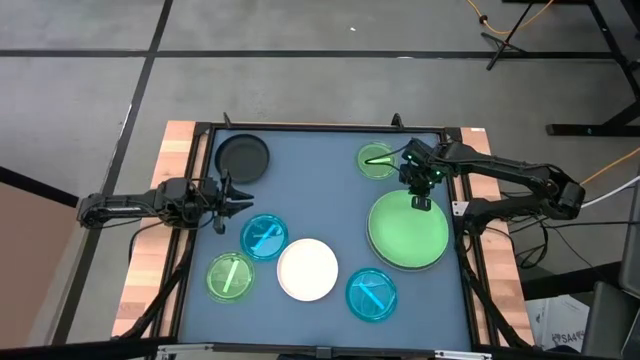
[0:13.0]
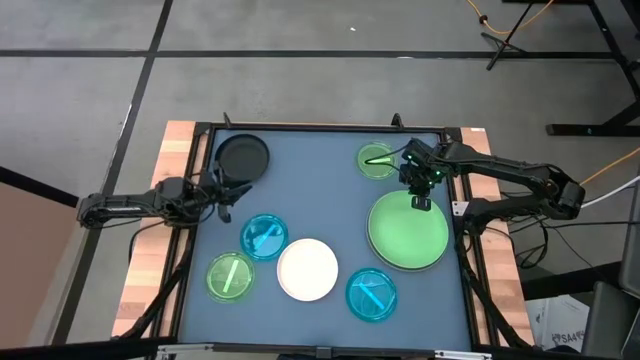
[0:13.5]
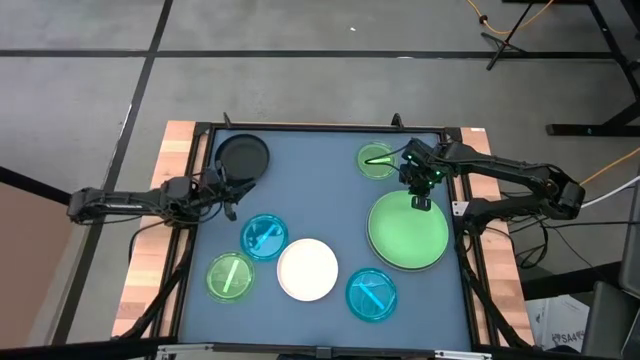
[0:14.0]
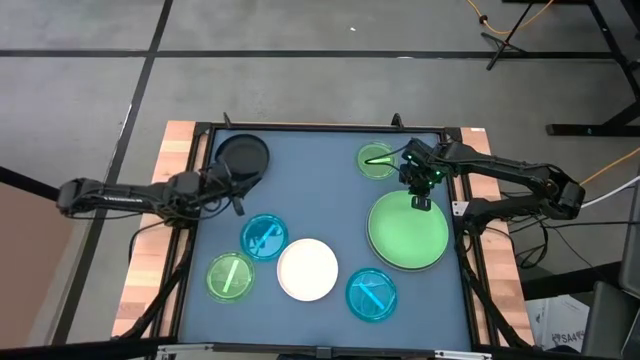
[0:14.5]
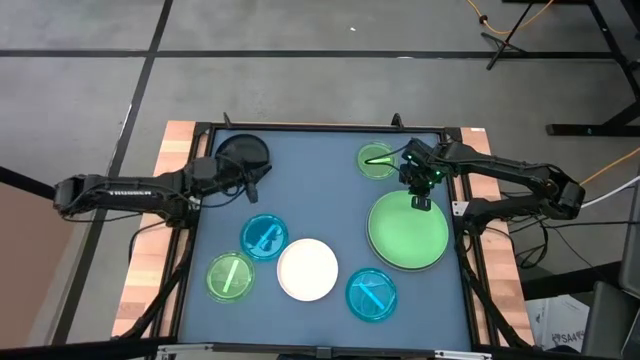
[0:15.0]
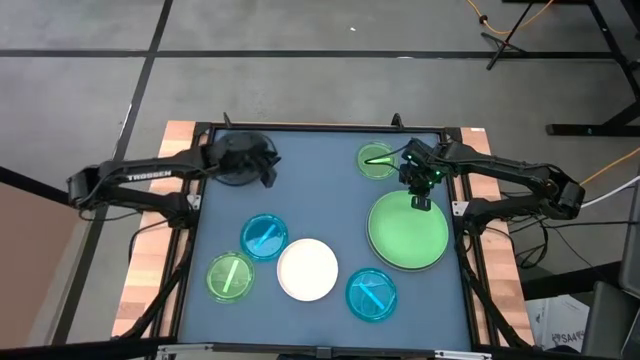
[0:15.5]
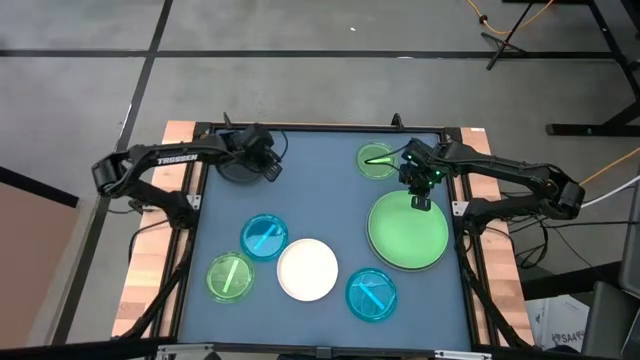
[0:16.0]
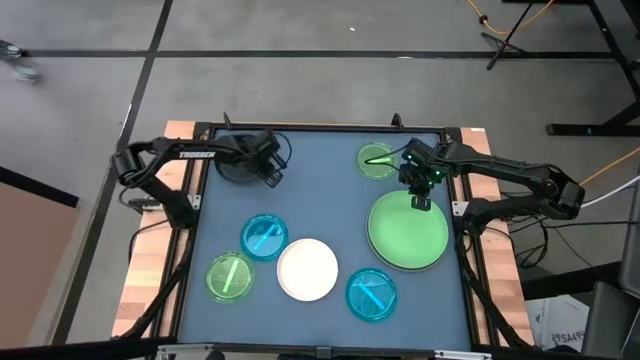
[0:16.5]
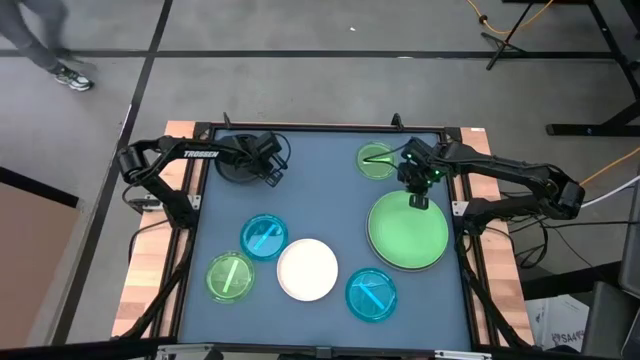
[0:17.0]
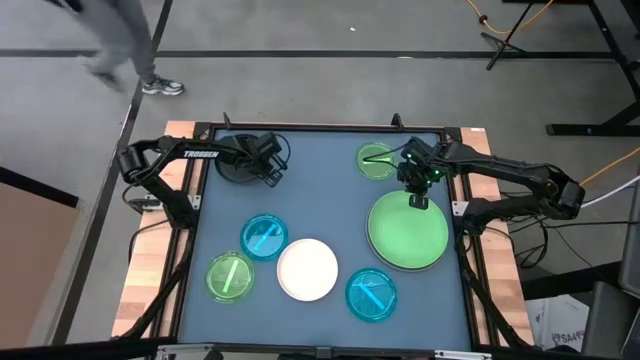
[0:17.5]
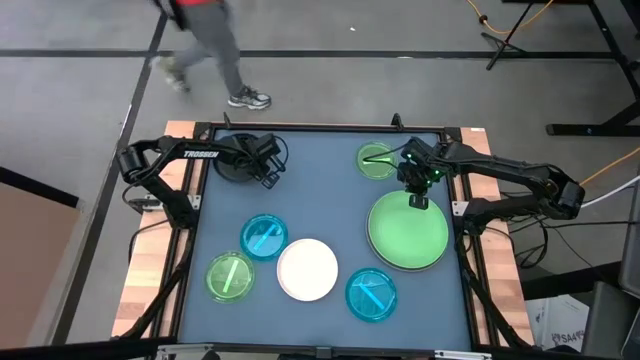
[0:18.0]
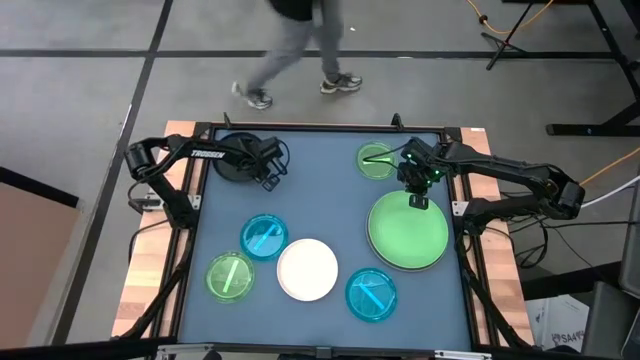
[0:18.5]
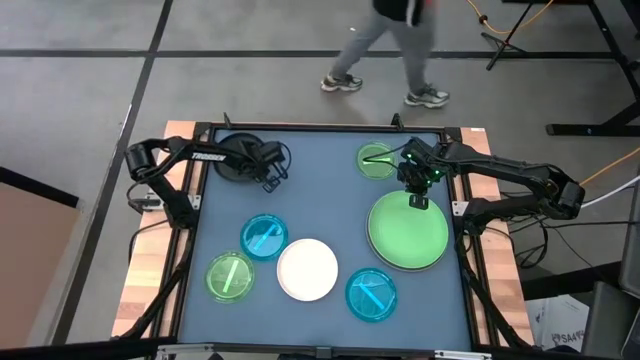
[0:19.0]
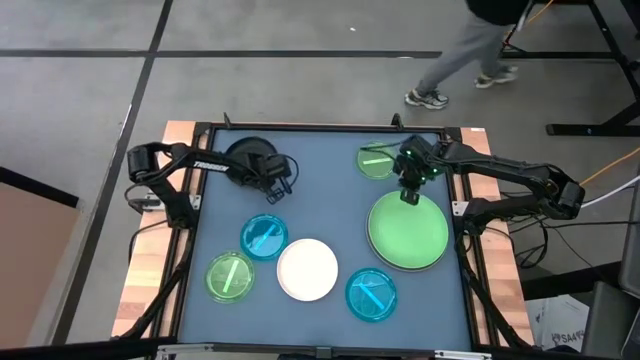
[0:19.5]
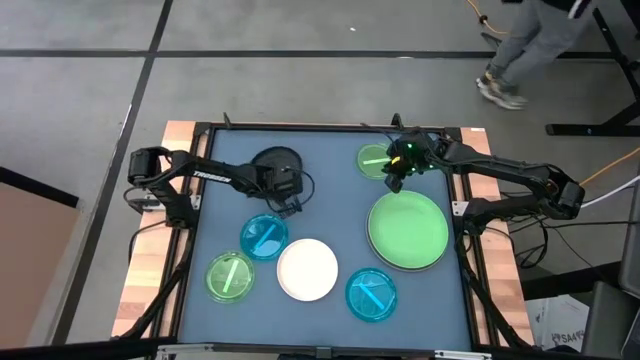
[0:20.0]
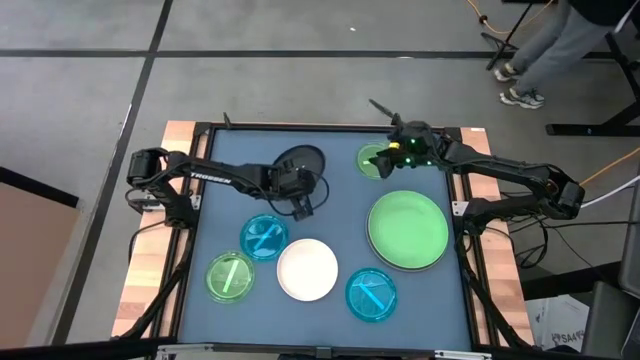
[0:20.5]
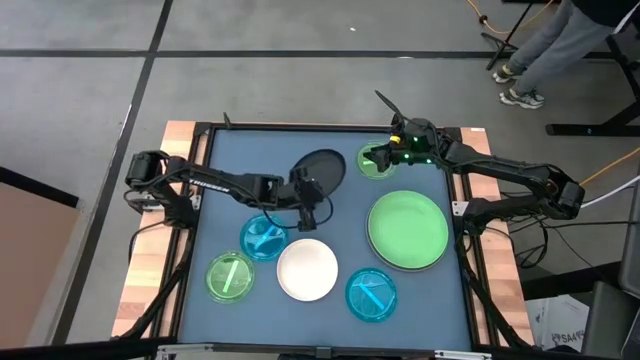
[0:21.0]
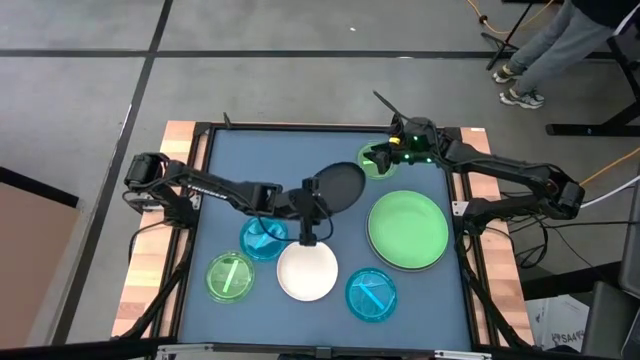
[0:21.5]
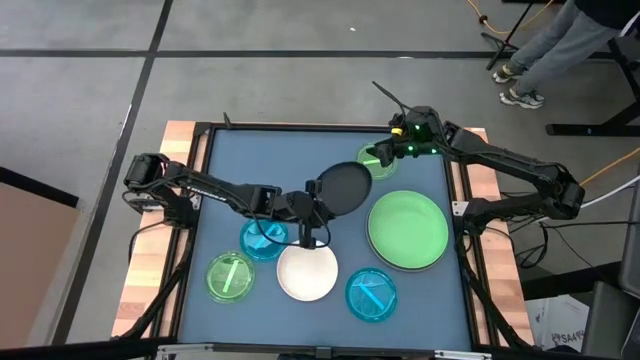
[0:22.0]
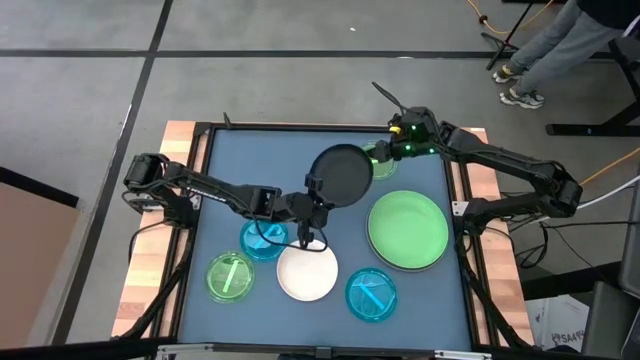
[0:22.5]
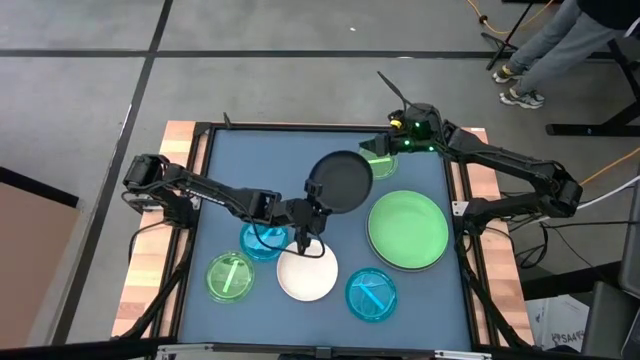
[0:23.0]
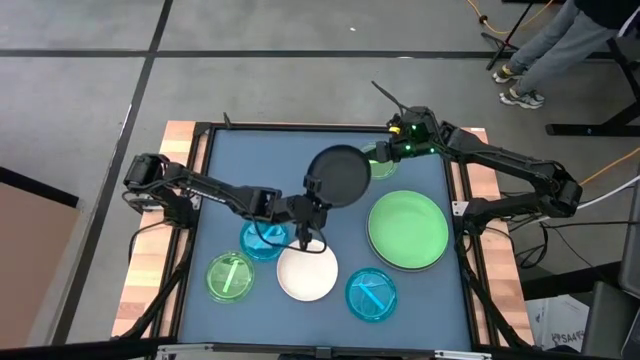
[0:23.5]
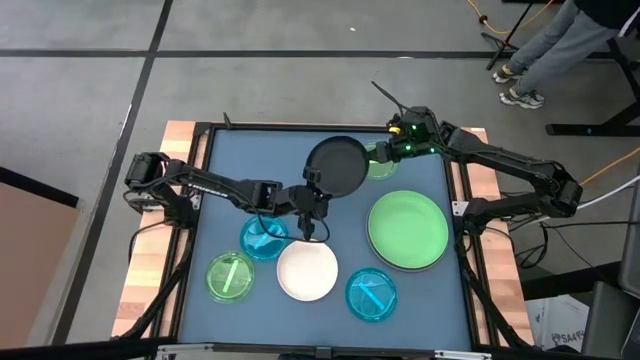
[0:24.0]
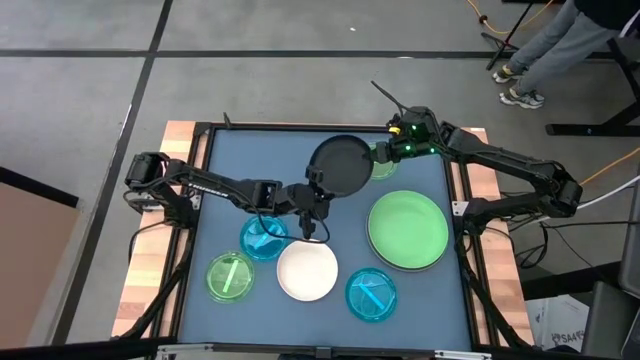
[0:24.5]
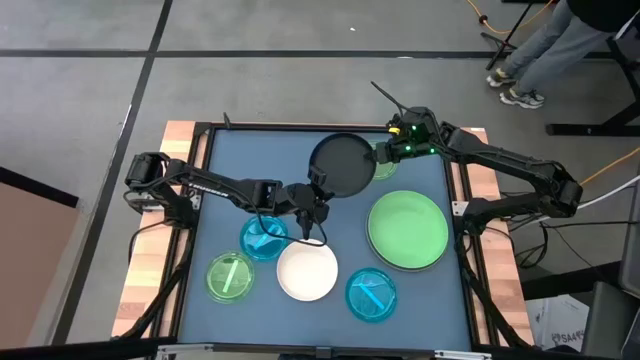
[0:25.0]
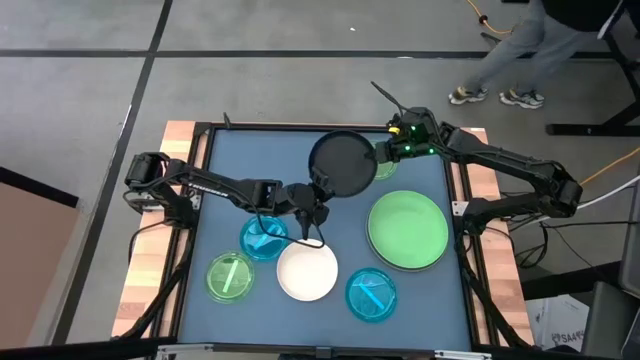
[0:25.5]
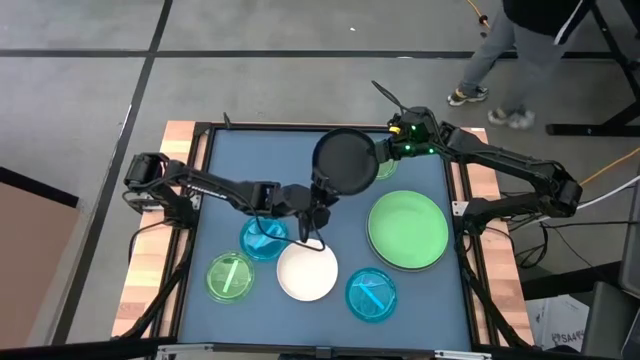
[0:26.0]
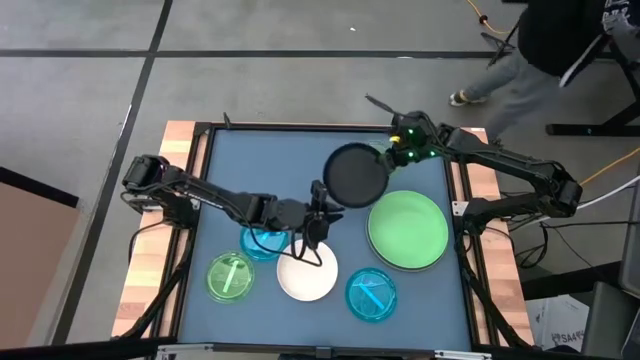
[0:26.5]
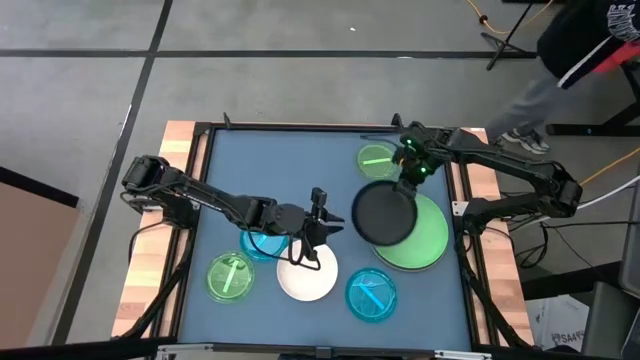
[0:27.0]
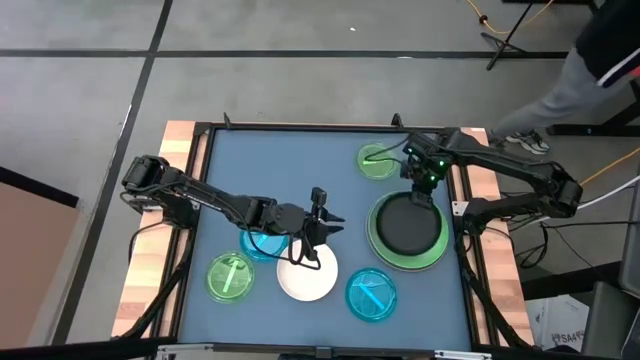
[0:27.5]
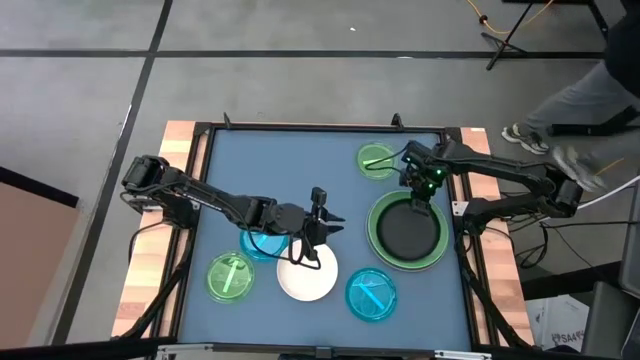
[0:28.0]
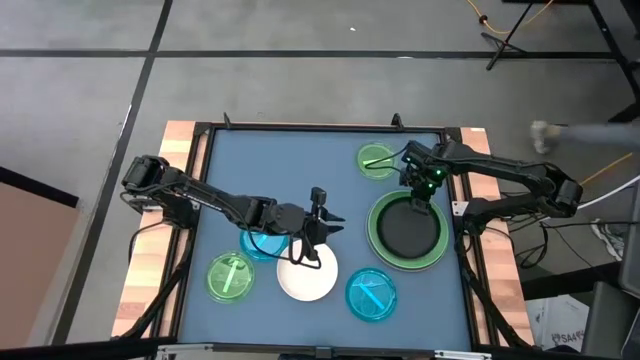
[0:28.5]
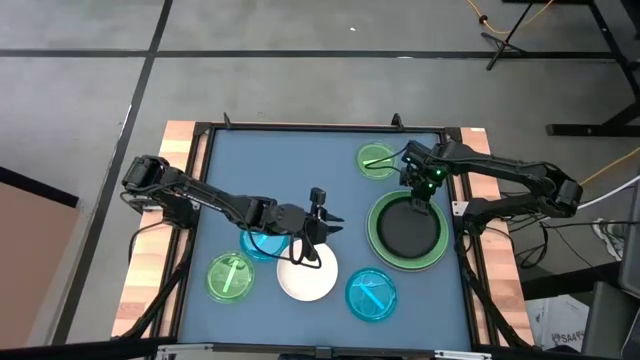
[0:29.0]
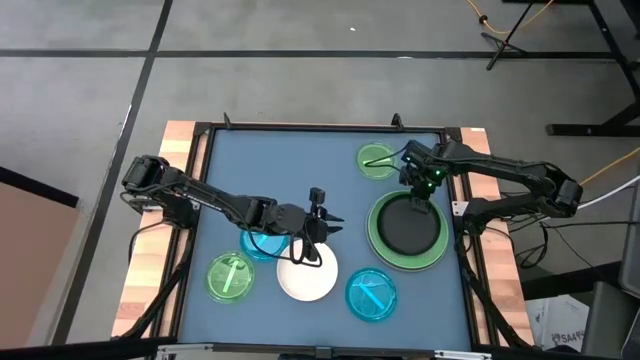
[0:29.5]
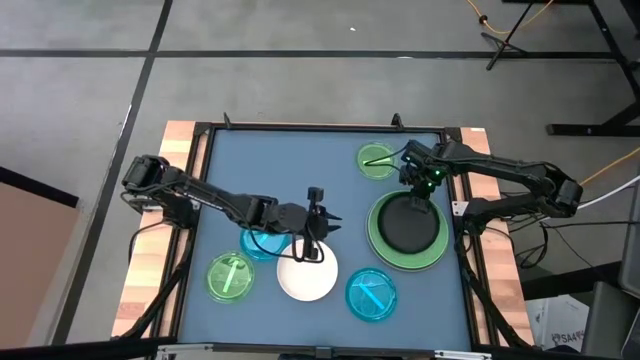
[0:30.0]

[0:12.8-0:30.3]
Task: Stack plastic plates
Stack the black plate on top of the light green plate

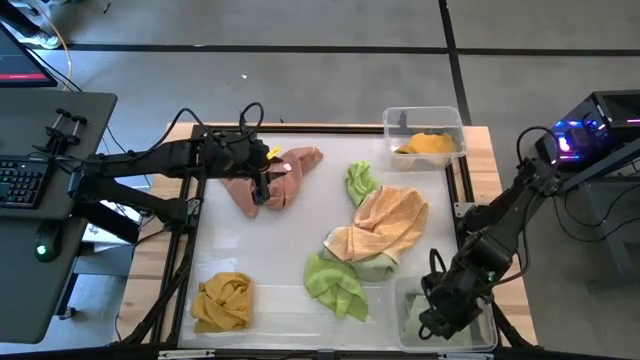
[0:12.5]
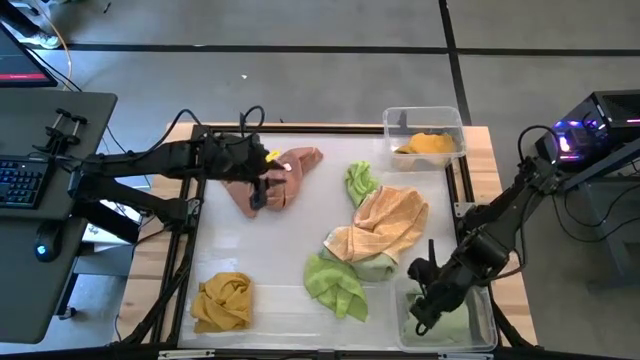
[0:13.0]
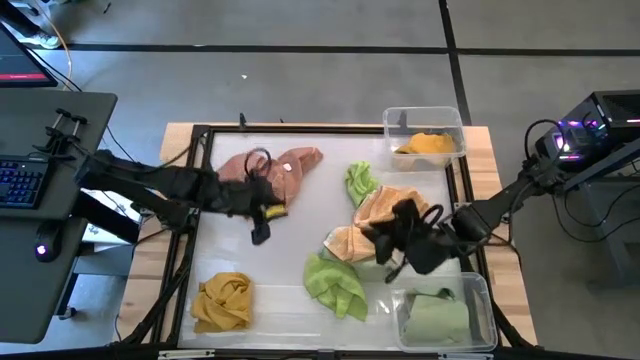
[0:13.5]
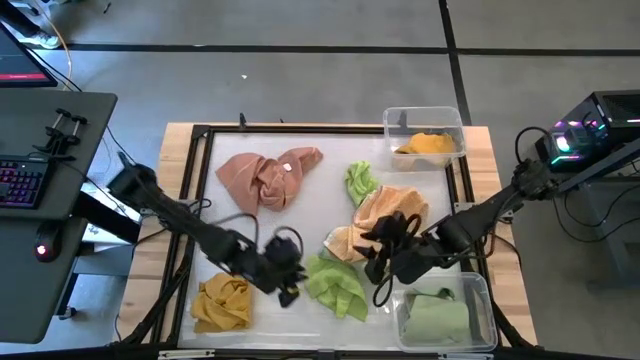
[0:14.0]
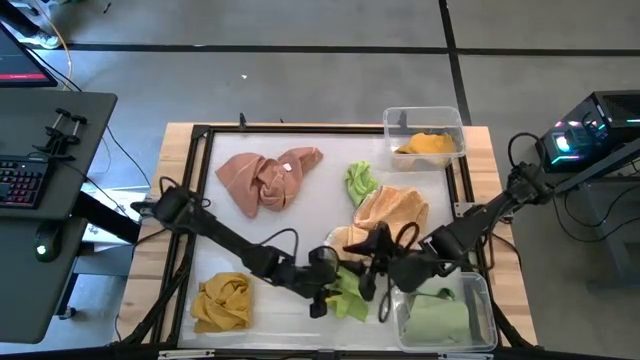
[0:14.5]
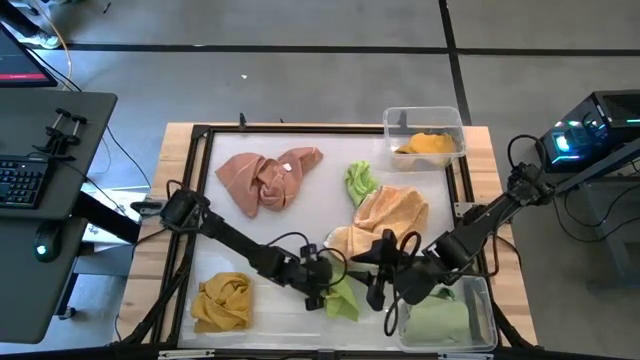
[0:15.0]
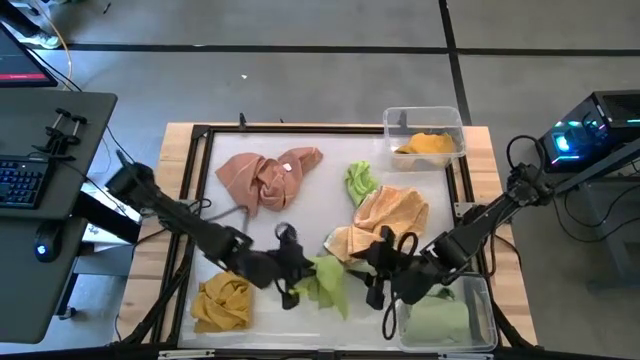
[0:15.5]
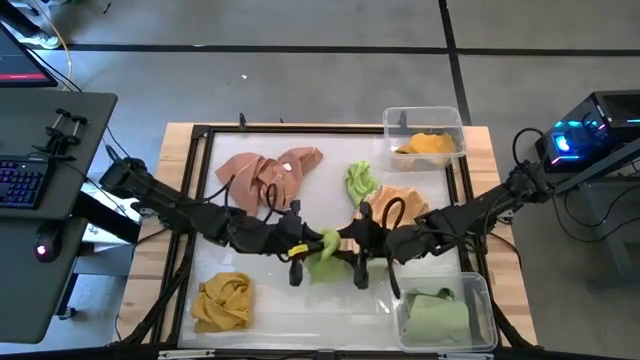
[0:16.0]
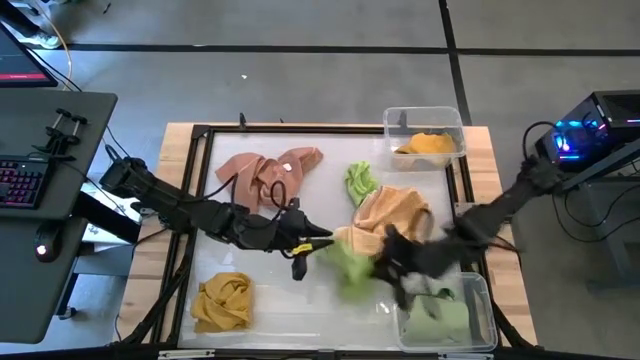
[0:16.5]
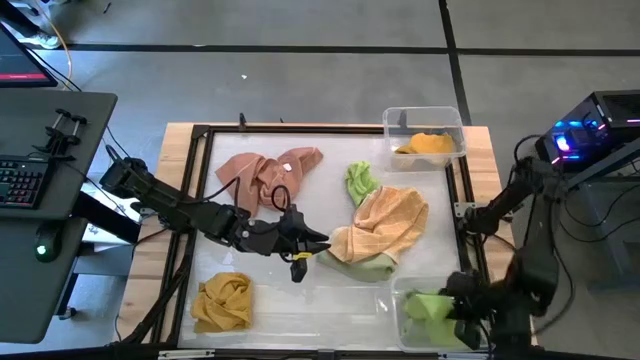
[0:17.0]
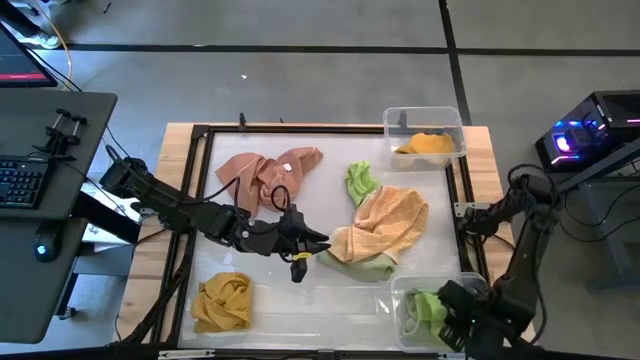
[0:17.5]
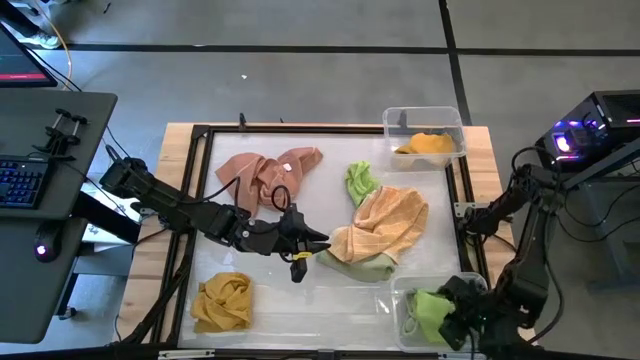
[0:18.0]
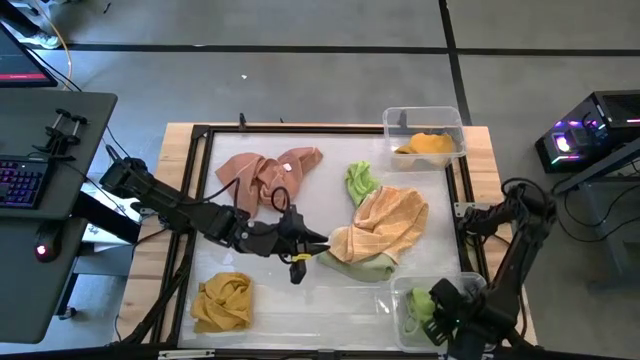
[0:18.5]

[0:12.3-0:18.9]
Task: Sort towels by color in basket
Put the bottom light green towel into the bottom transparent bin
